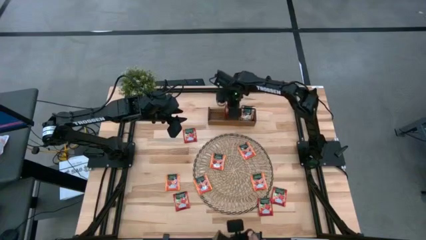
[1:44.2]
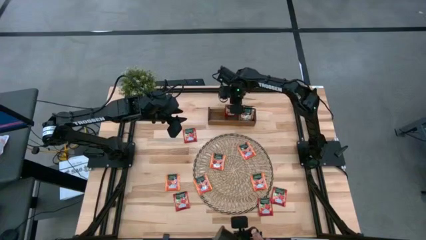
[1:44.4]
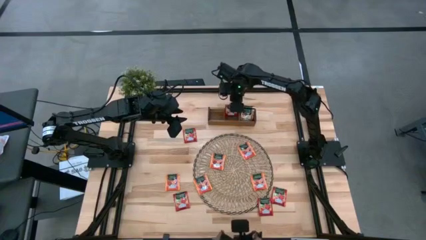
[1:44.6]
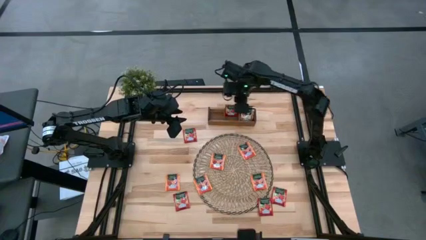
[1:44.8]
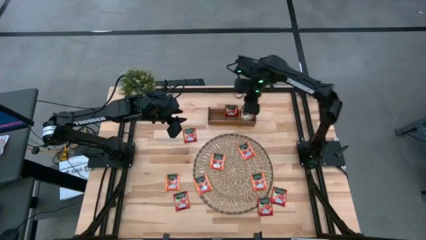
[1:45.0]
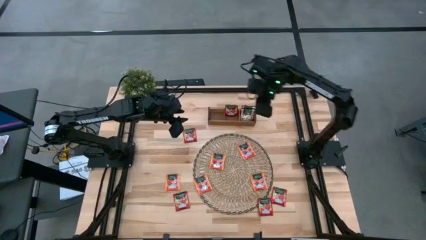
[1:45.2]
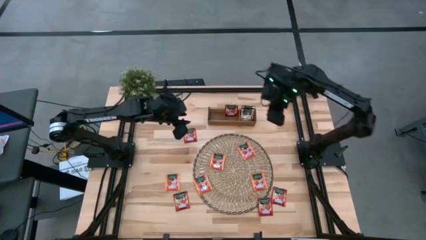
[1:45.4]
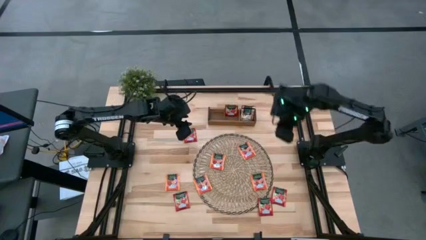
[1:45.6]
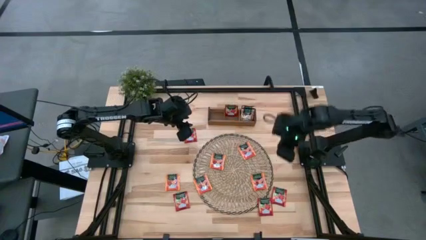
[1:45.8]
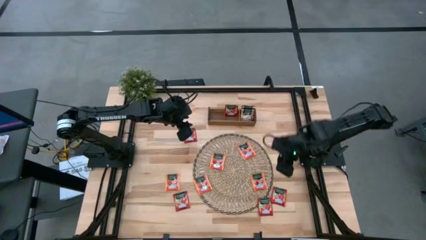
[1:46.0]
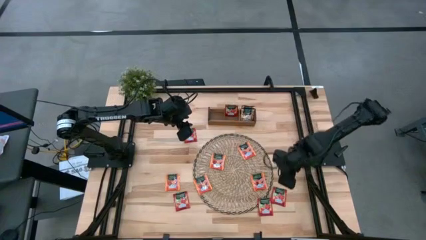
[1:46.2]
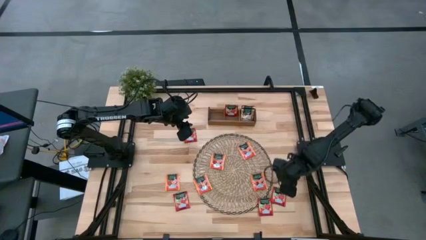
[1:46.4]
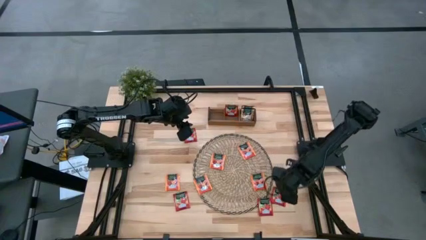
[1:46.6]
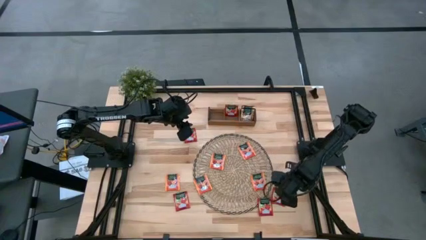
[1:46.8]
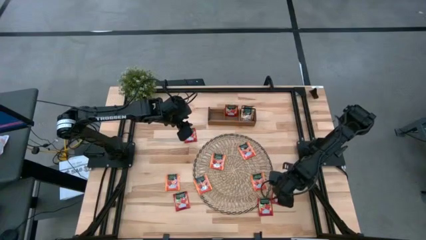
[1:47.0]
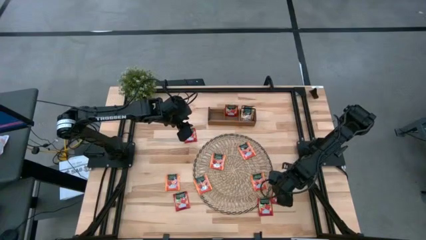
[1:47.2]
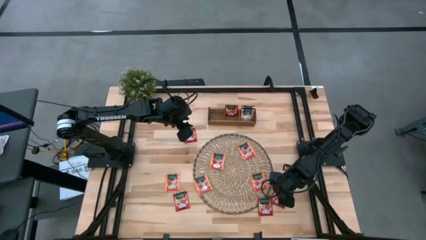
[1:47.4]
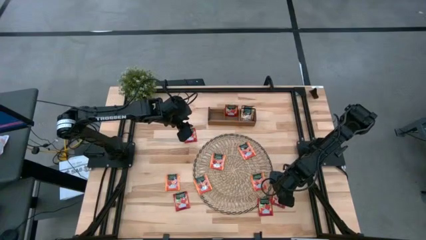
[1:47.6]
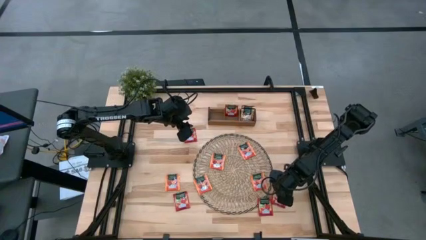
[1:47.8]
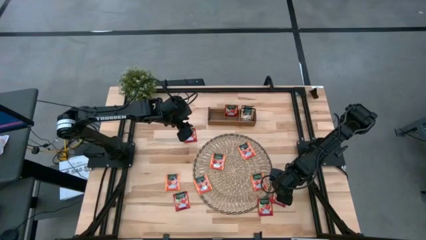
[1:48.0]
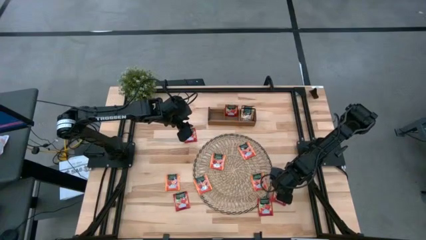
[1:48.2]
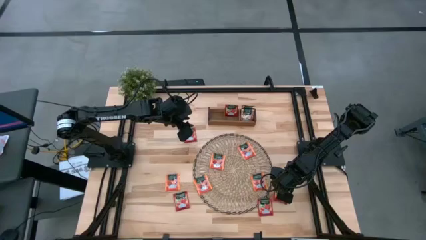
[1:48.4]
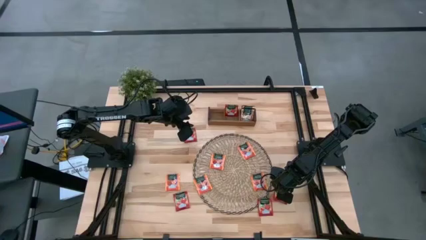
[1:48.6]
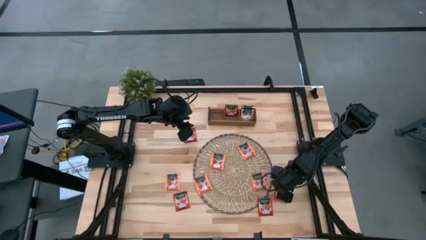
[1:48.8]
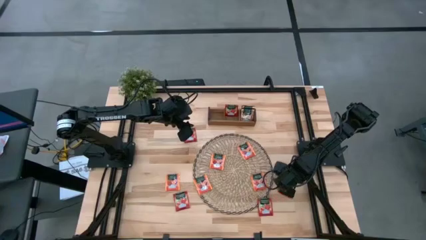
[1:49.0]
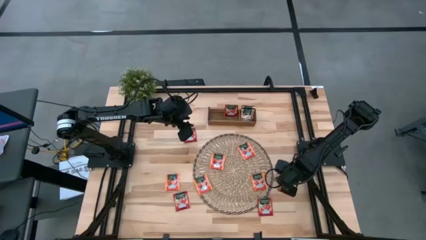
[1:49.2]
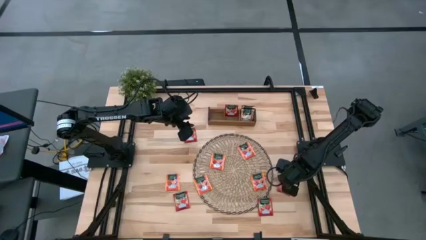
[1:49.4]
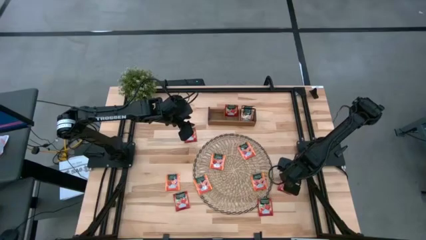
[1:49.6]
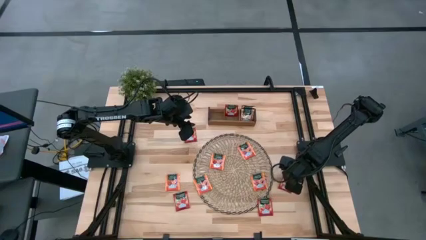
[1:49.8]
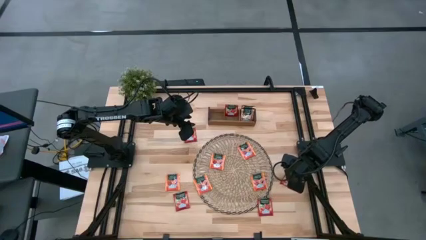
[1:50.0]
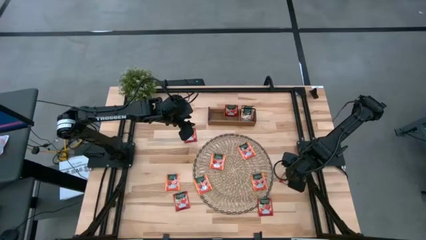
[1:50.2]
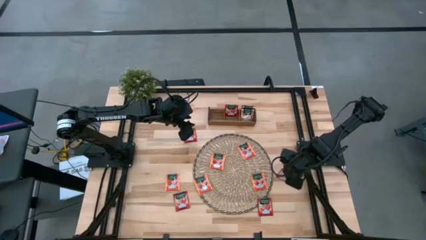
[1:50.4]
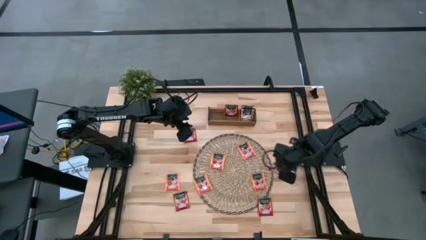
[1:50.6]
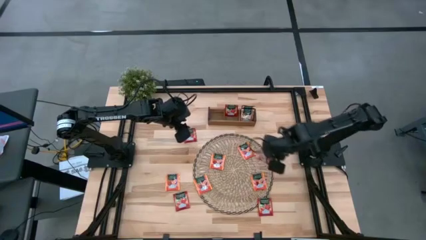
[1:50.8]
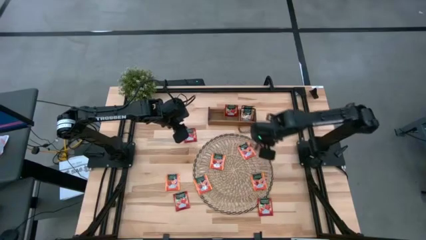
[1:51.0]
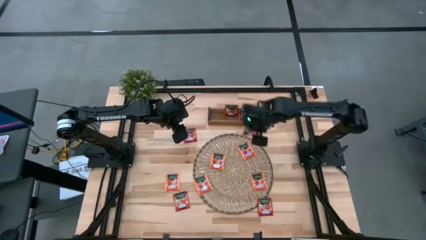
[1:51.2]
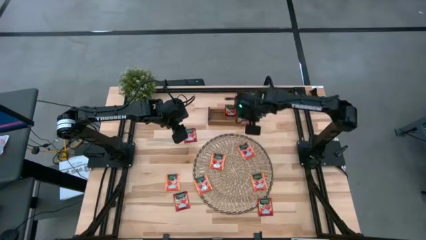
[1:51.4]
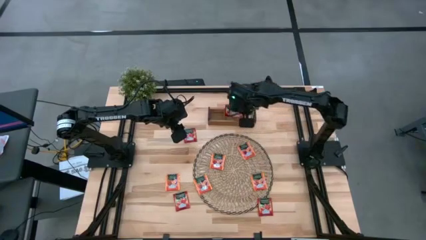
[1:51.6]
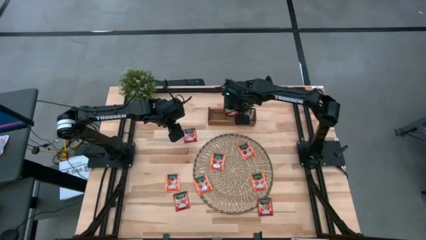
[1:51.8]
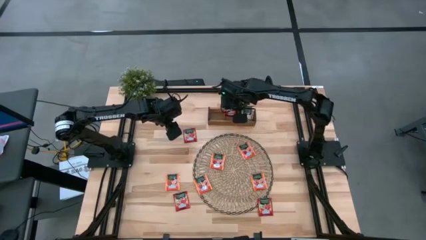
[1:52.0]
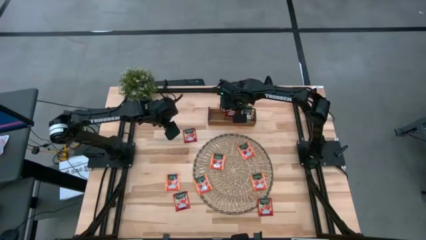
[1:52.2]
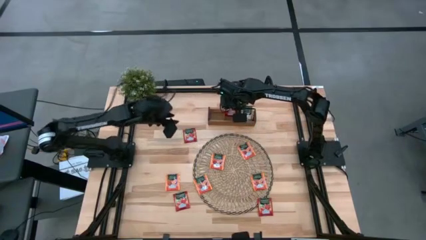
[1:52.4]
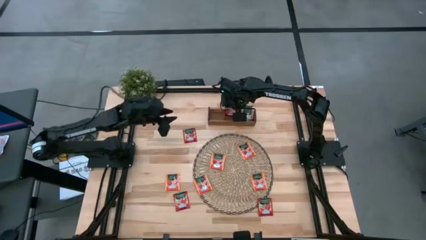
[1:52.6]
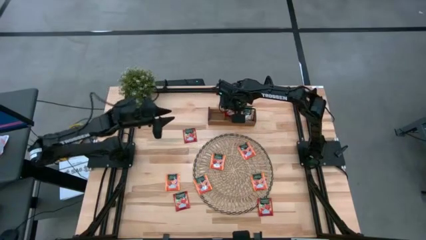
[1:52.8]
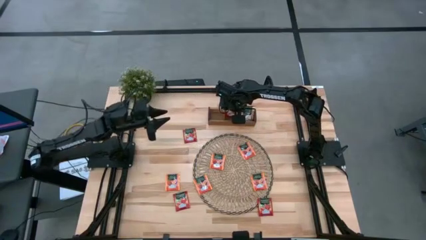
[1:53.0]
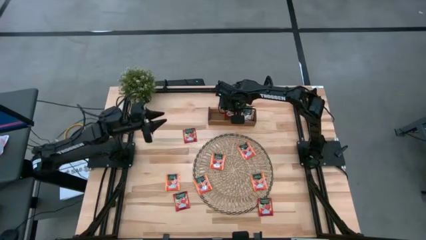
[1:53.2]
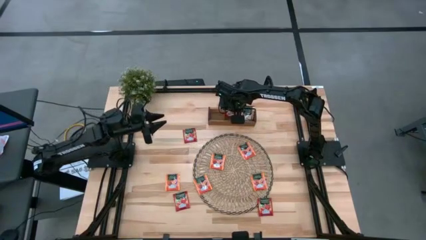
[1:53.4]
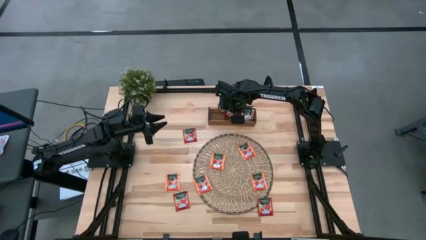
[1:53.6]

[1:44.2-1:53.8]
Task: Pick & Place Tea
Put the red tea bag into the middle section of the wooden organizer

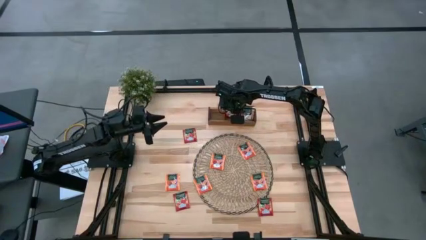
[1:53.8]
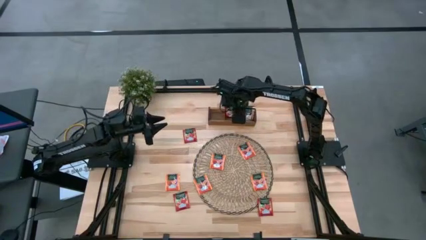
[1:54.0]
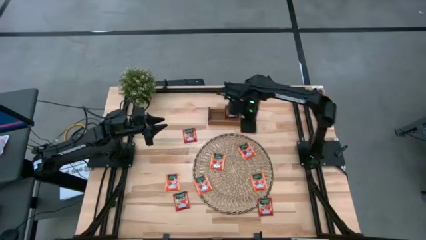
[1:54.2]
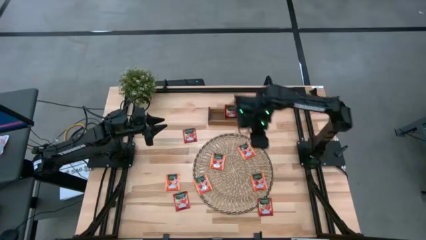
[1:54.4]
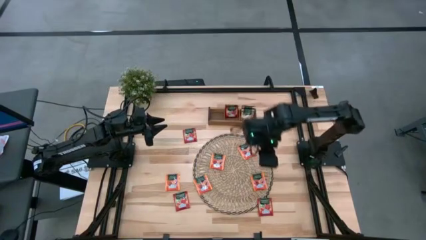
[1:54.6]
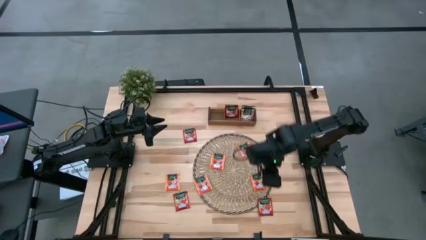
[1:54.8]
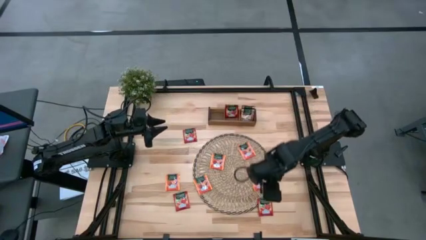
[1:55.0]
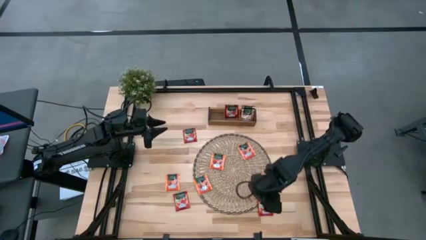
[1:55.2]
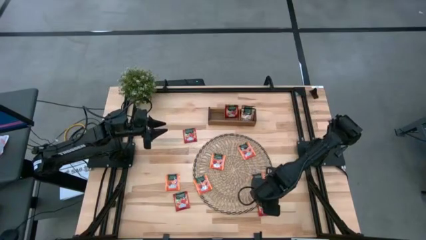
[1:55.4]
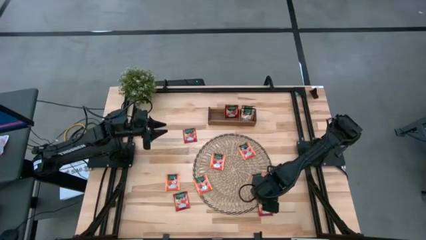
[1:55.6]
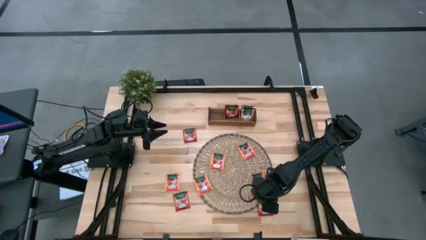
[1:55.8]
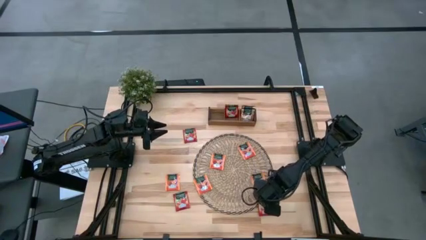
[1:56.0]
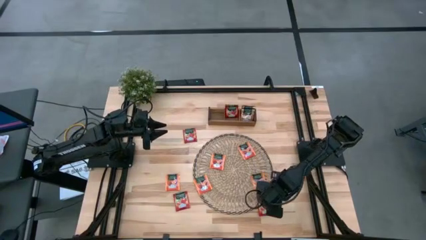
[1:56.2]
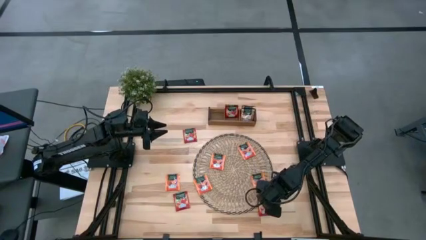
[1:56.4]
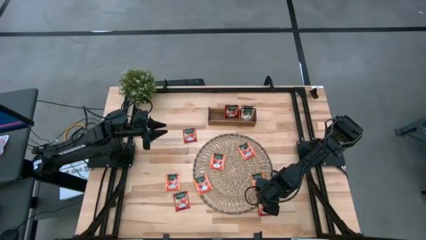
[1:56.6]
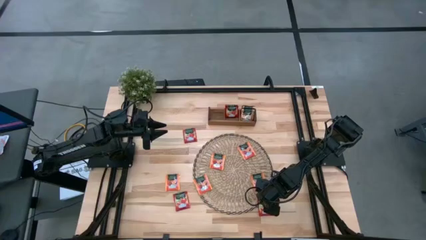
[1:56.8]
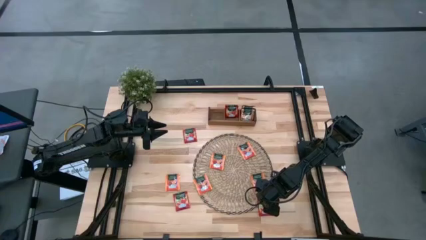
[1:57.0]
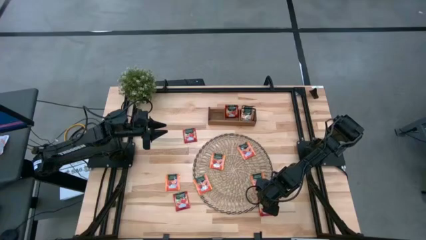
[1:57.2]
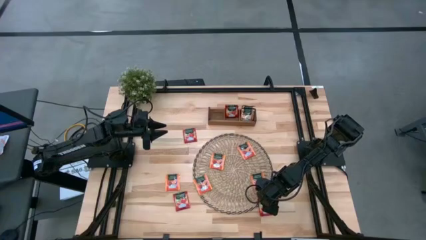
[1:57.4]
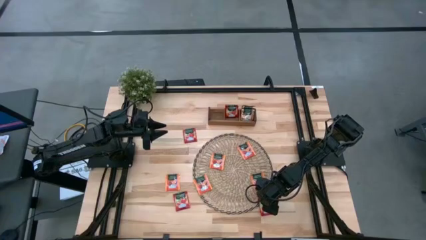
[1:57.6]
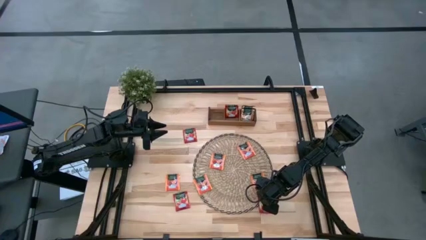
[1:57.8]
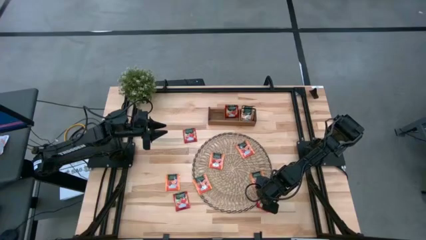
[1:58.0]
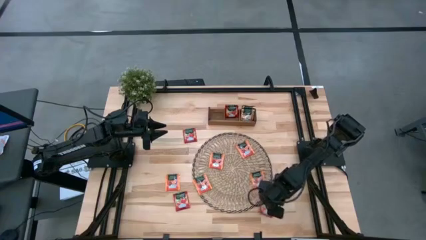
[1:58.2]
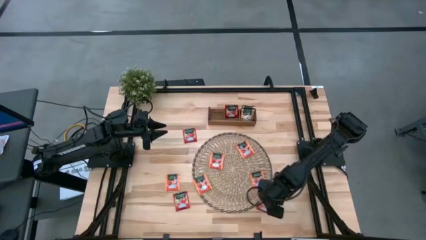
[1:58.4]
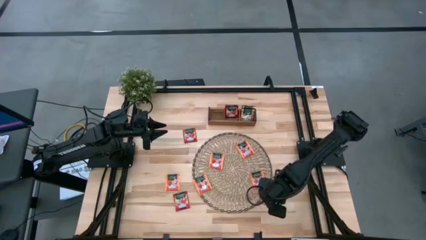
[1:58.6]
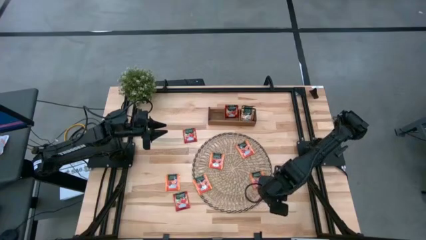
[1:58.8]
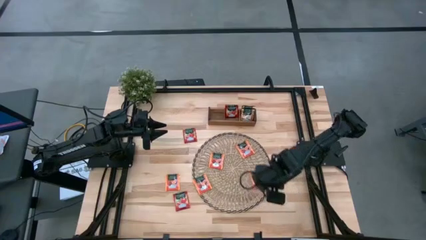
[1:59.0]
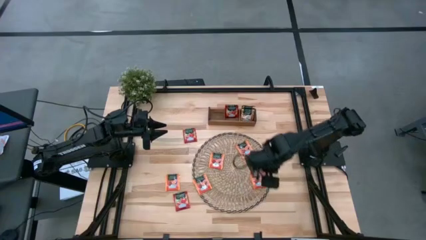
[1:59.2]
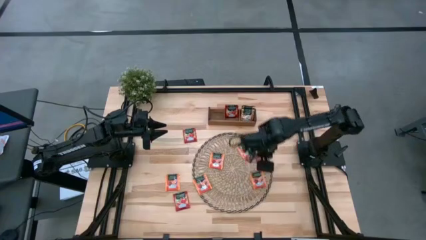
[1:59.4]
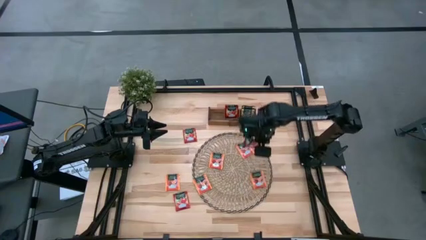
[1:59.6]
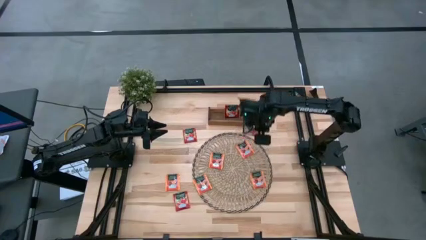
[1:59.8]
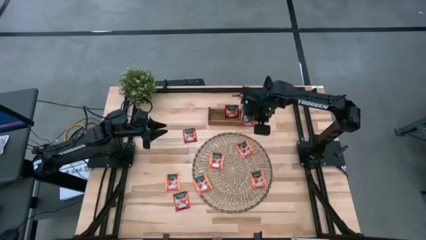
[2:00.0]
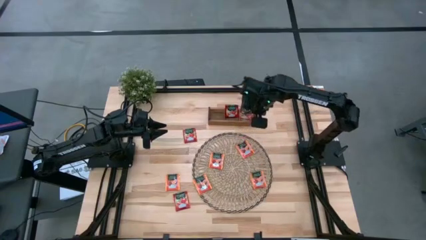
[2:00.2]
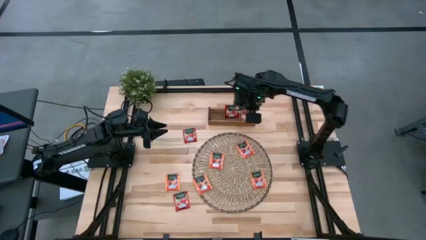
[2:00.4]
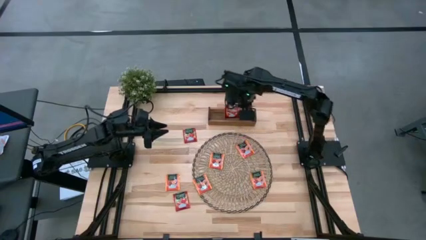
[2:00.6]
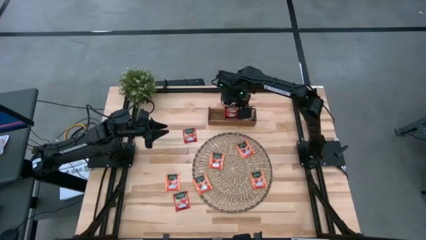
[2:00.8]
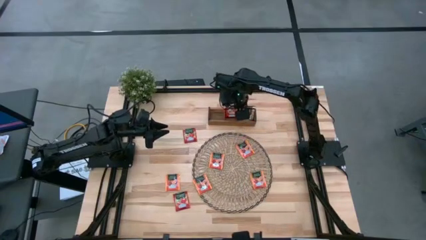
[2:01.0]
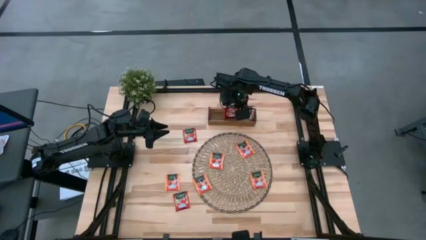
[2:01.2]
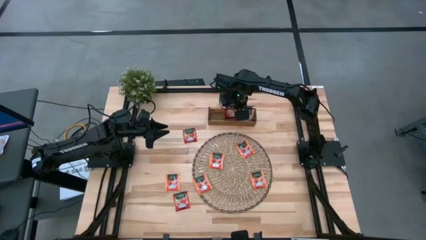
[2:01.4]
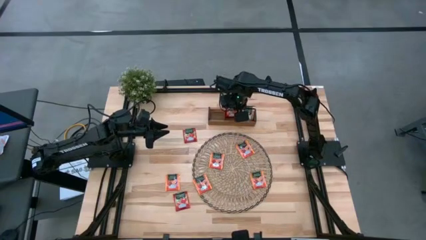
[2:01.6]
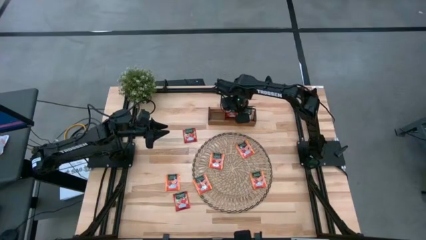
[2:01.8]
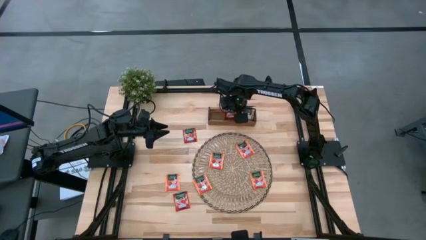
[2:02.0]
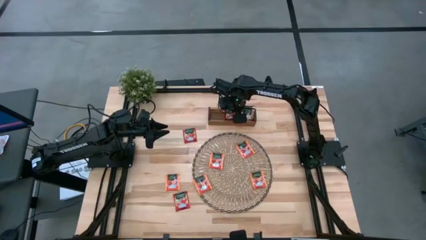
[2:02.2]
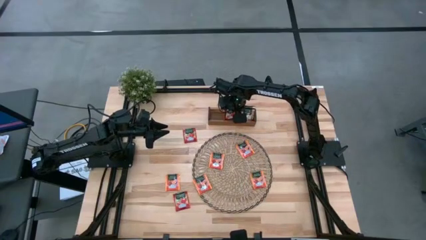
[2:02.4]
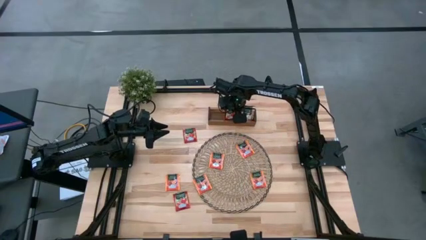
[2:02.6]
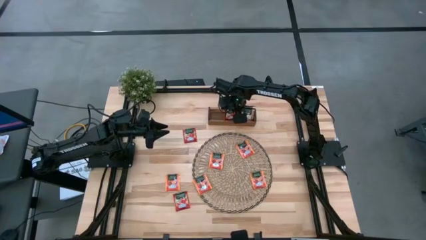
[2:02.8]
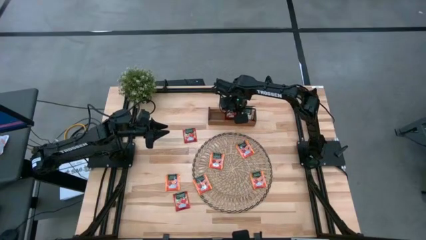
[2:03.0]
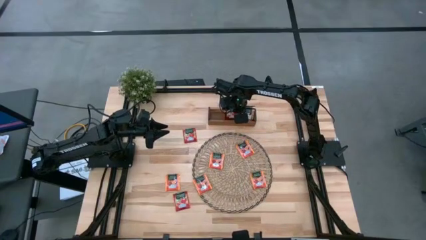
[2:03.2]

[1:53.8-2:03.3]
Put the bottom right red tea bag into the middle section of the wooden organizer
